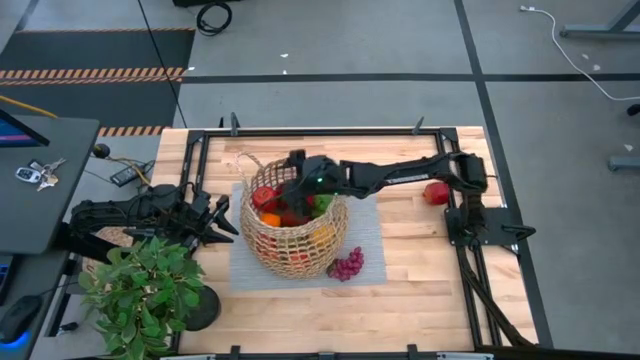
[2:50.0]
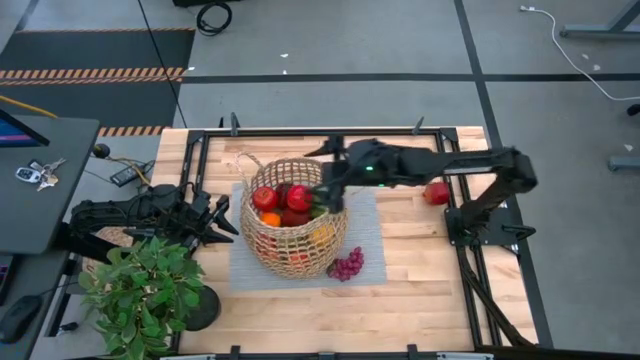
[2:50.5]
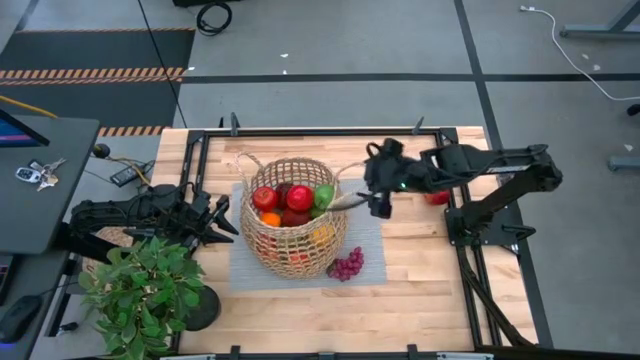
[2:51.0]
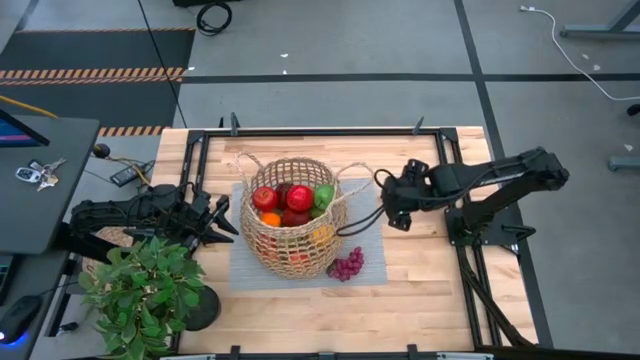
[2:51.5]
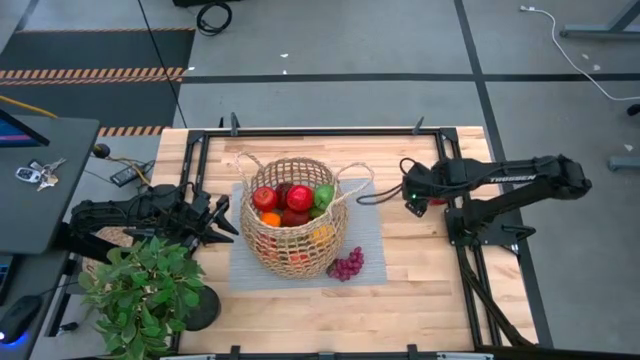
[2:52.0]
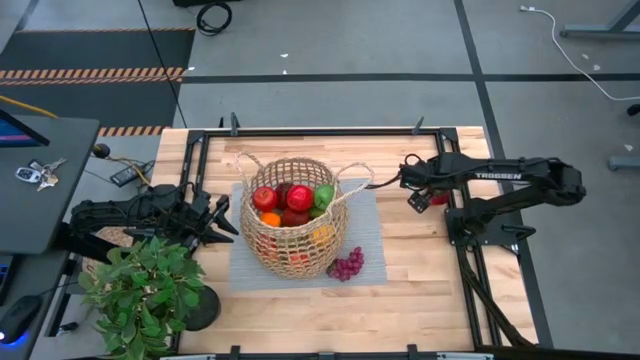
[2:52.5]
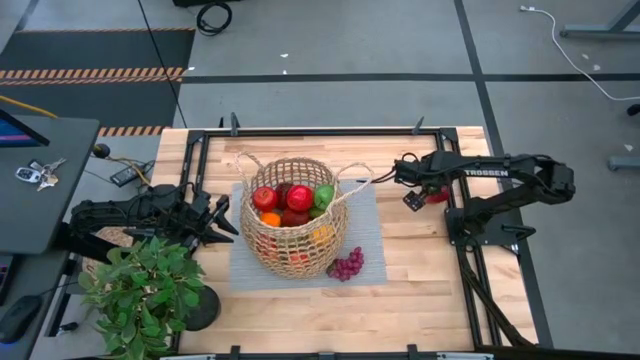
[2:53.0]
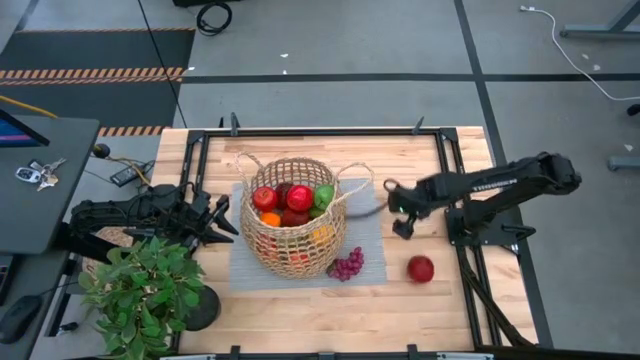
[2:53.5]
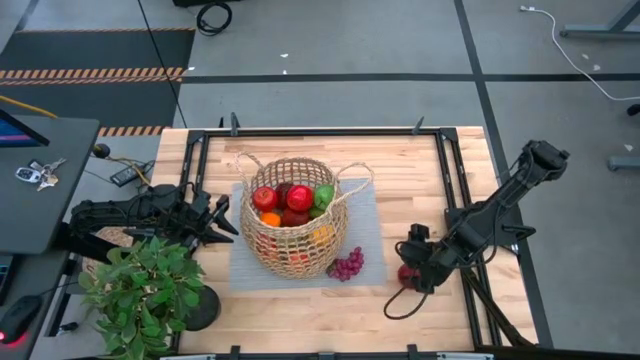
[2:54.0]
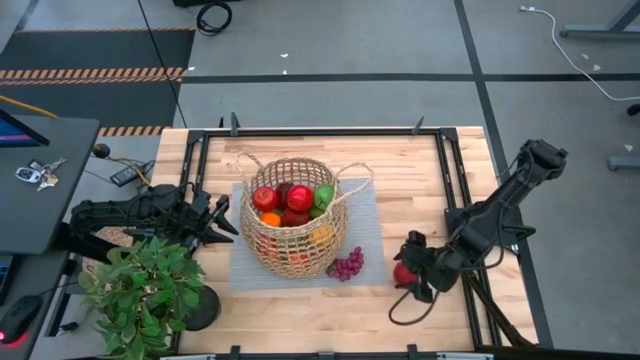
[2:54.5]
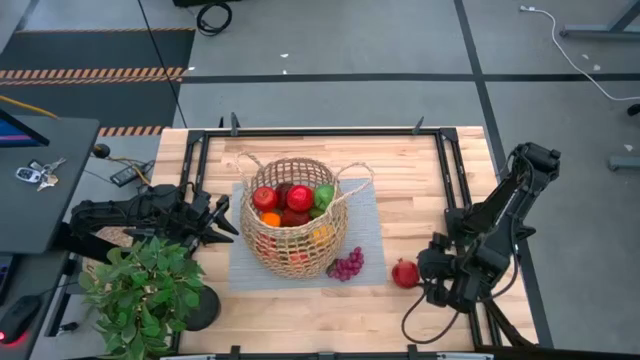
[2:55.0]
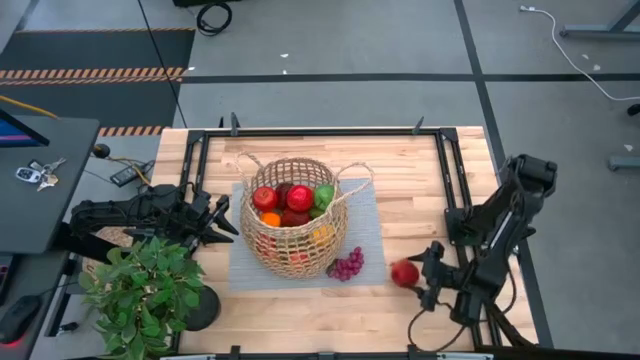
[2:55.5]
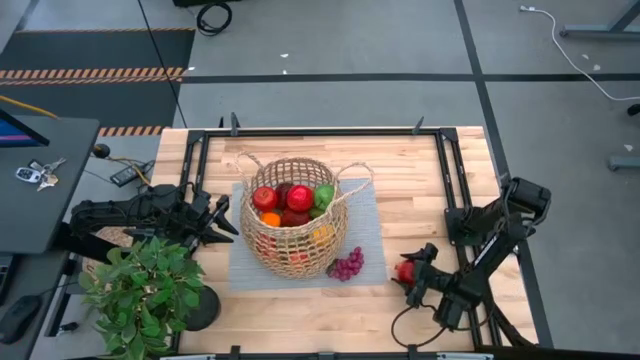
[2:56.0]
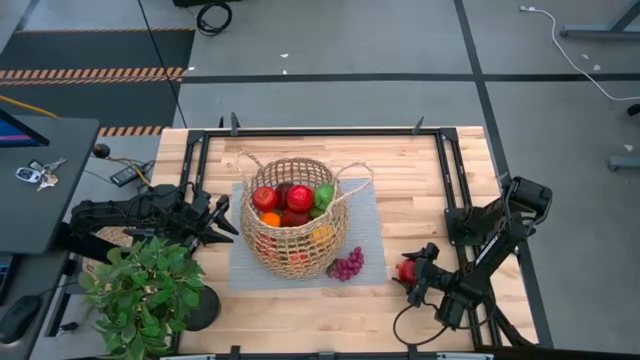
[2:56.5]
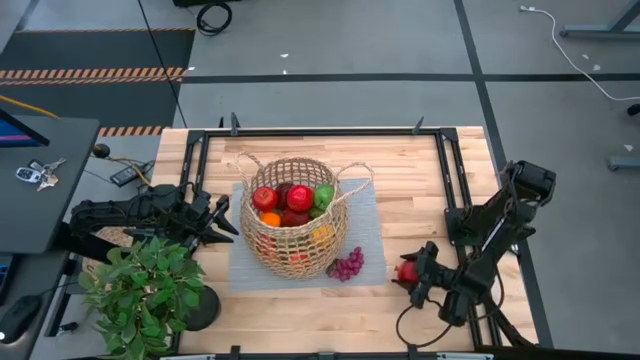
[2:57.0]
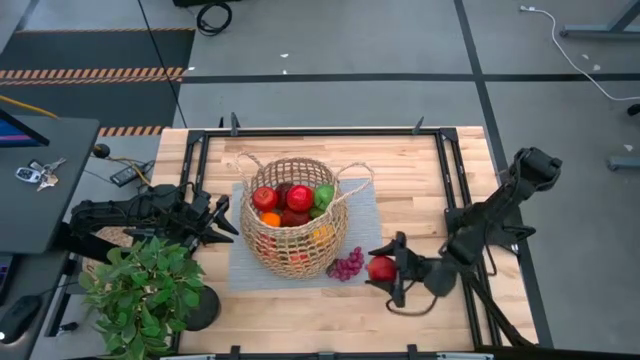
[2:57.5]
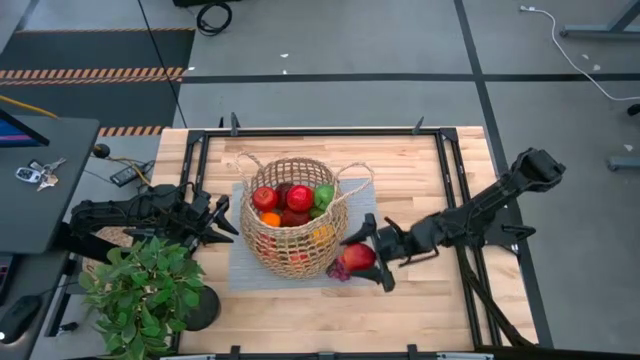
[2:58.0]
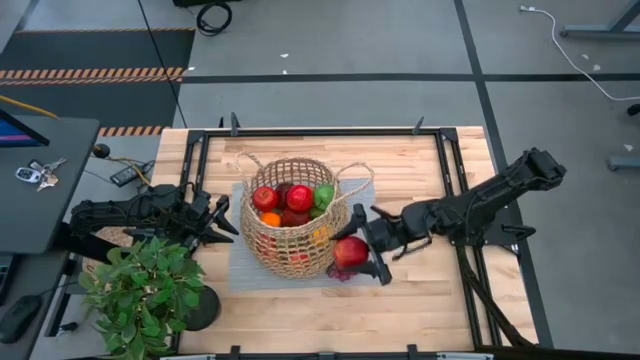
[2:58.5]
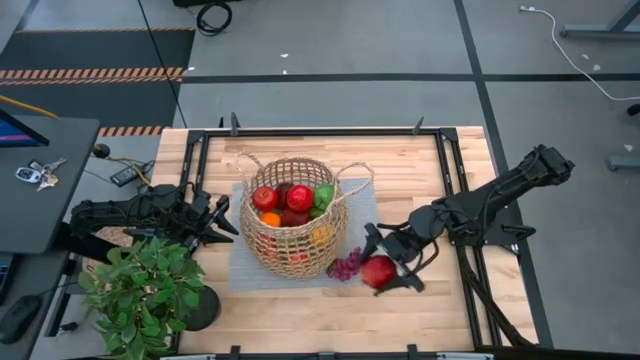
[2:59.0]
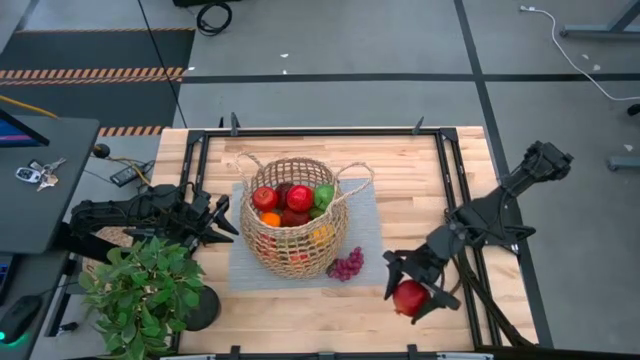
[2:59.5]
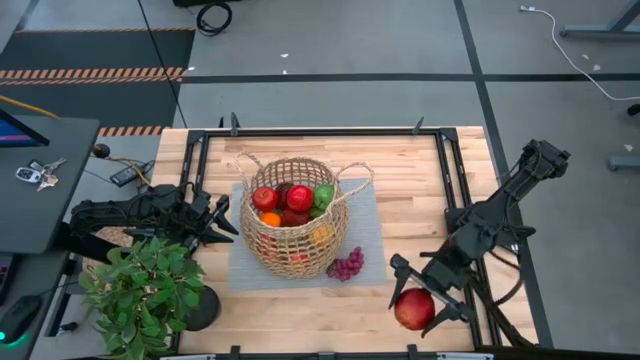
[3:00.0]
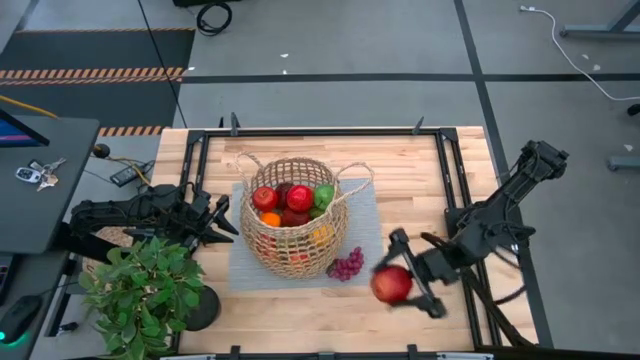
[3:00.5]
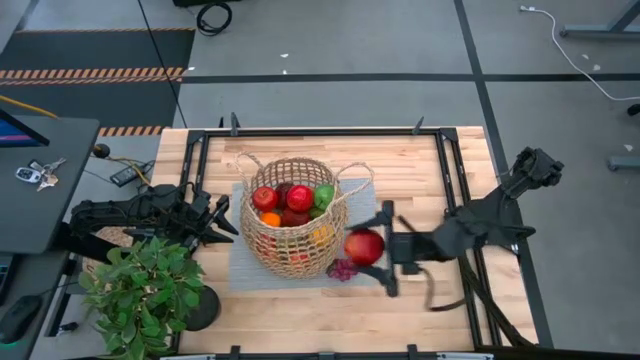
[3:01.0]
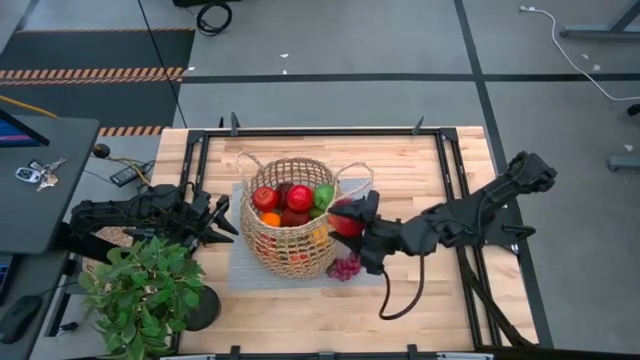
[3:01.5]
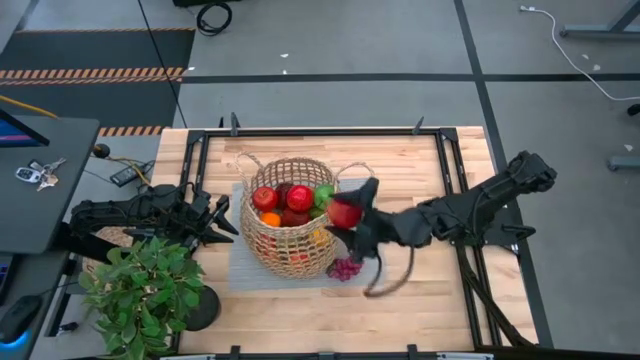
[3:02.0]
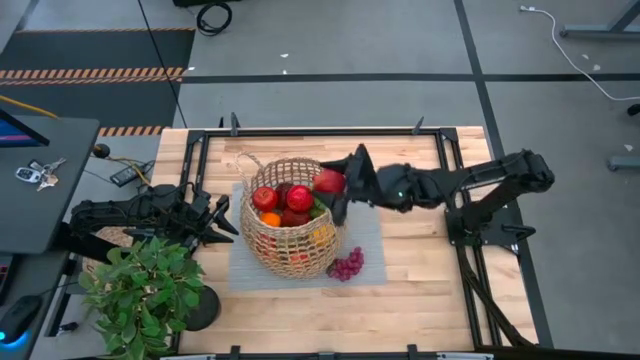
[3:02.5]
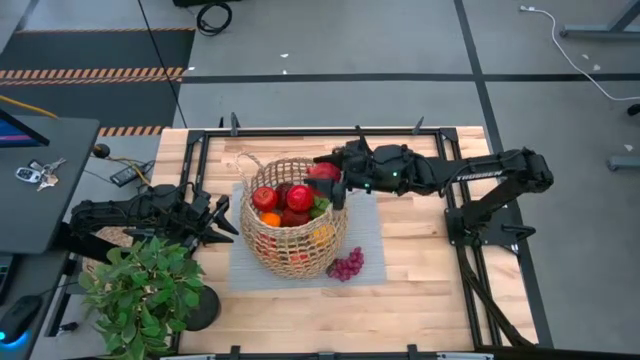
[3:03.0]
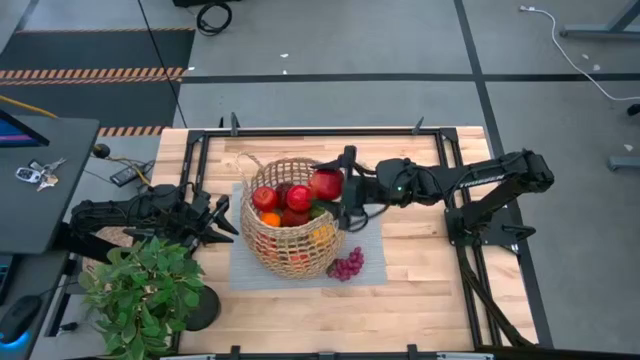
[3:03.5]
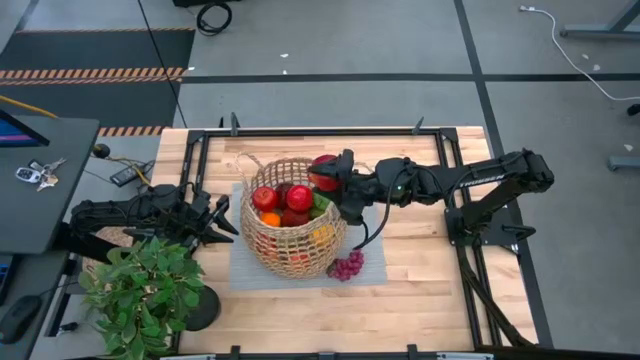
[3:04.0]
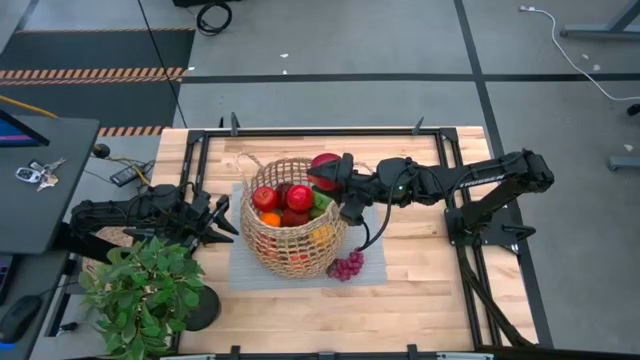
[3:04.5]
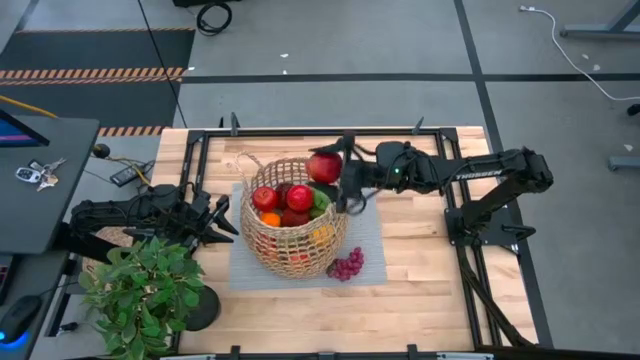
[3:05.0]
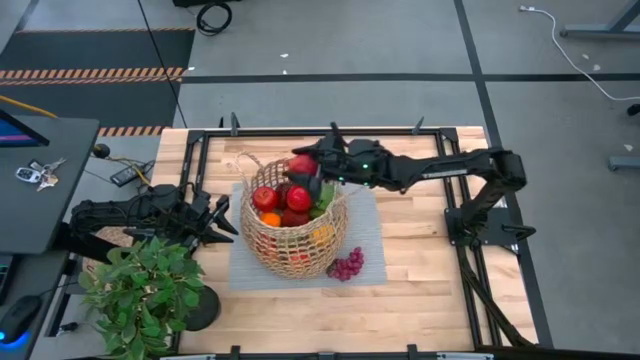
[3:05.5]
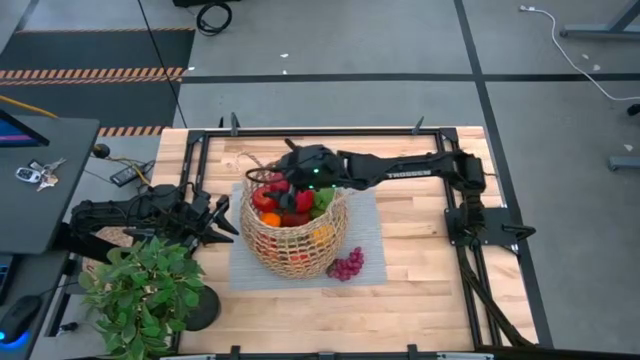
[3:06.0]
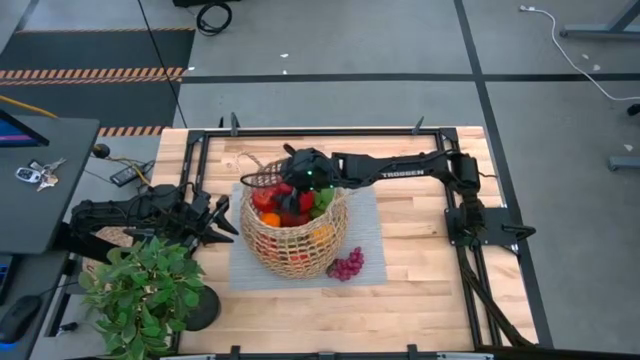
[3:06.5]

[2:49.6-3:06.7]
Task: Build produce basket
Put the pomegranate into the brown basket

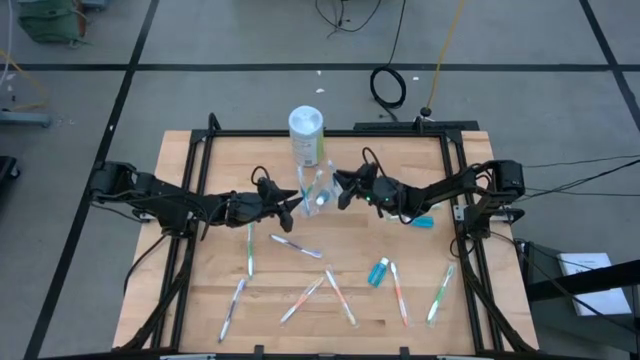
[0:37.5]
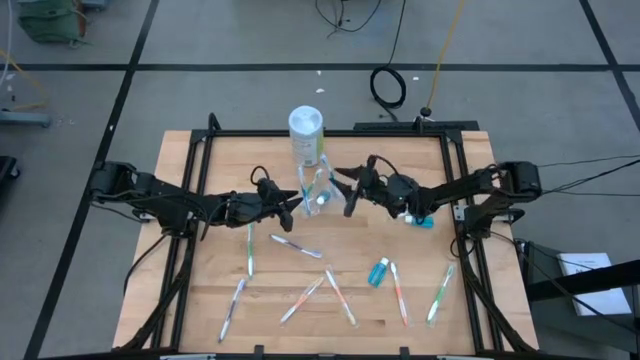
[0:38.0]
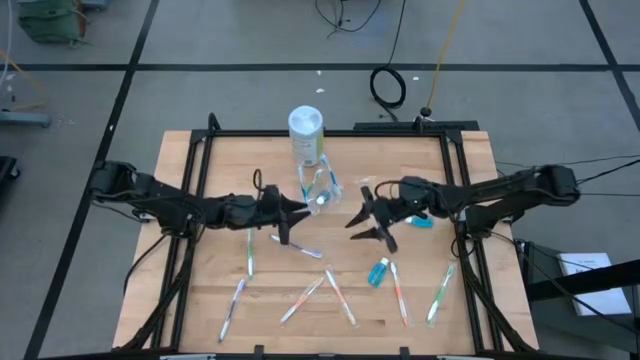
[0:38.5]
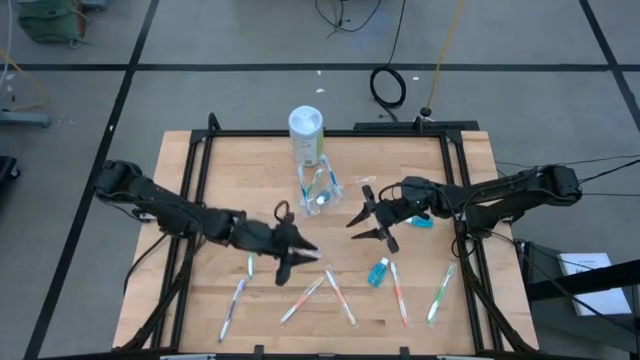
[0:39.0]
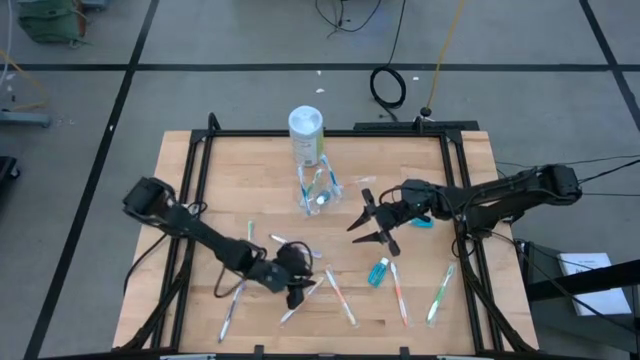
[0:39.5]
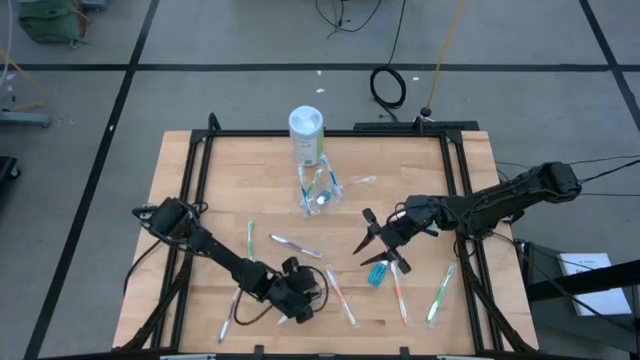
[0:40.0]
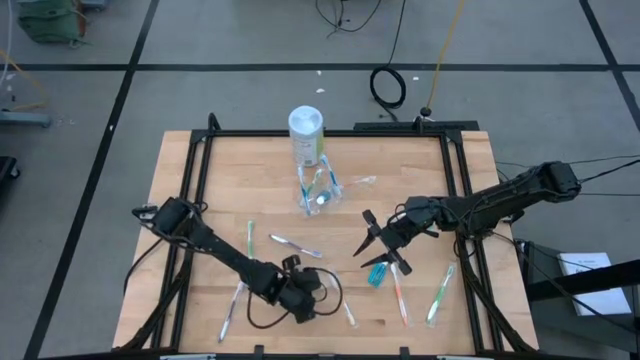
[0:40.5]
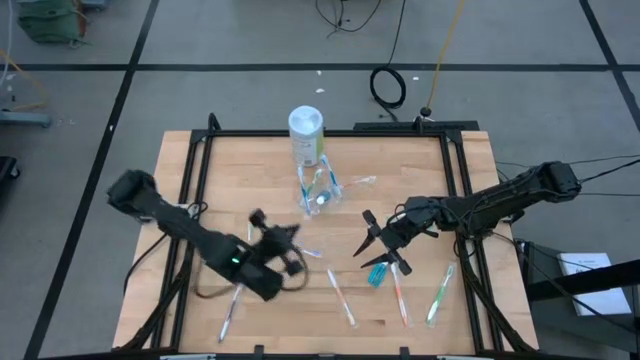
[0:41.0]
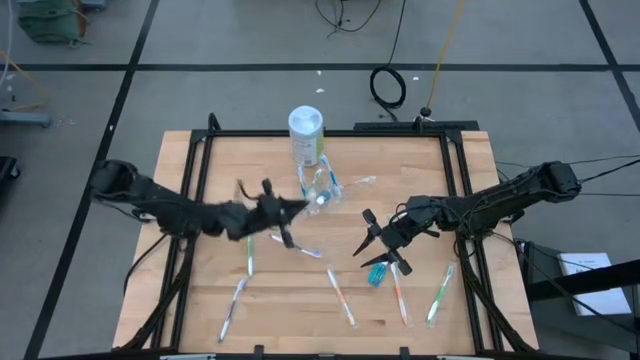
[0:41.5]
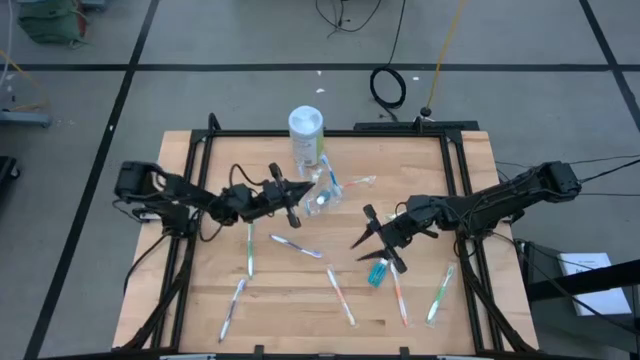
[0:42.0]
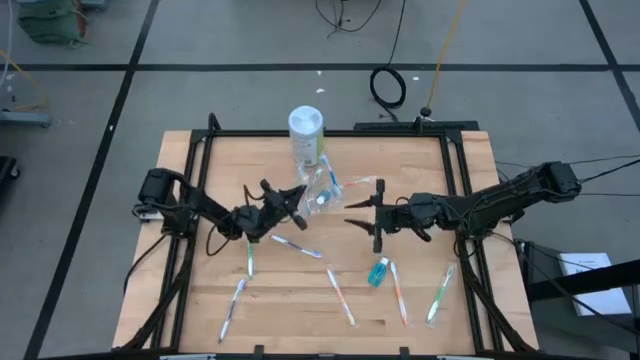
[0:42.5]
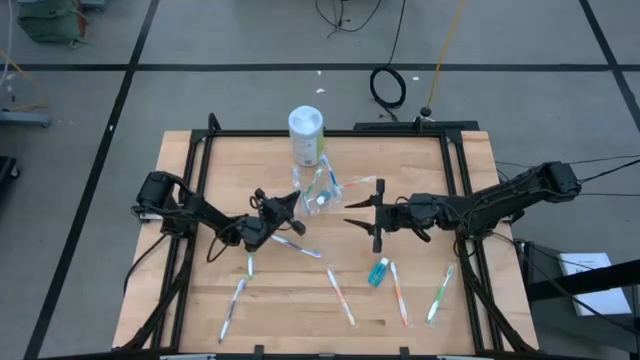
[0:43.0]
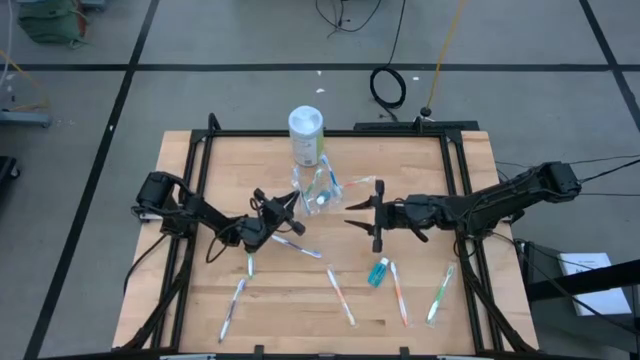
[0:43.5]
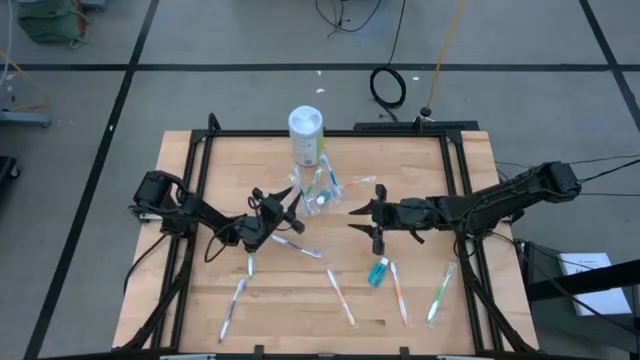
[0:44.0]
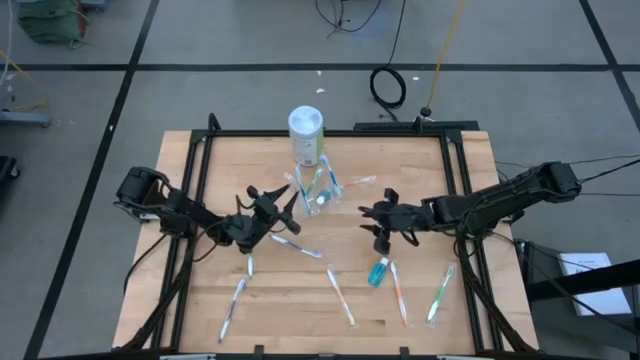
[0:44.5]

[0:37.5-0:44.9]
Task: Pick & Place toothbrushing station
Put the orange toothbrush into the transparent organizer
